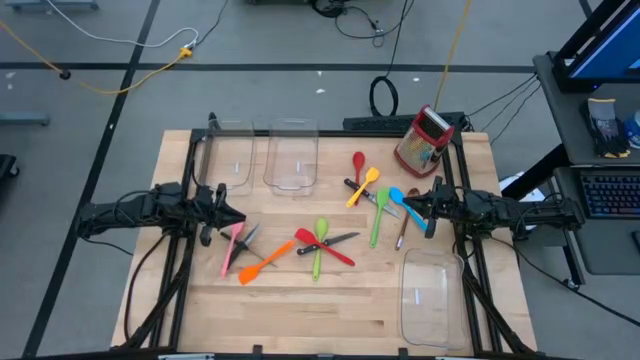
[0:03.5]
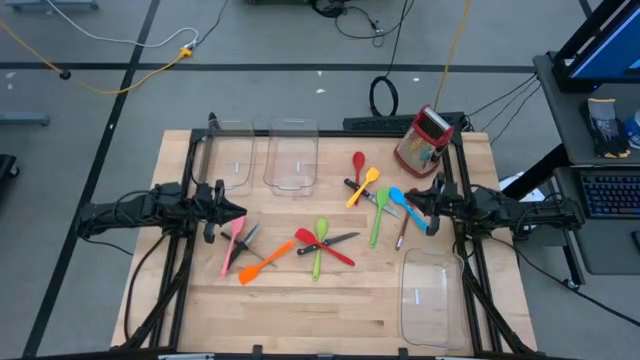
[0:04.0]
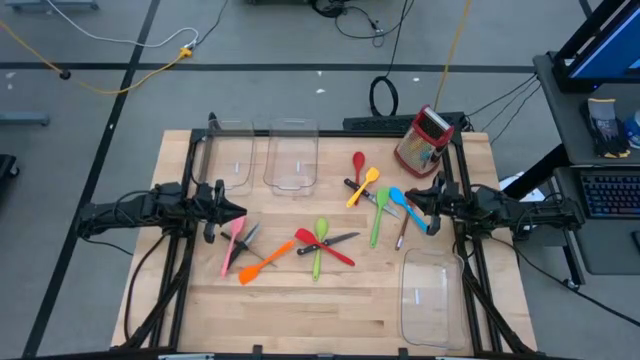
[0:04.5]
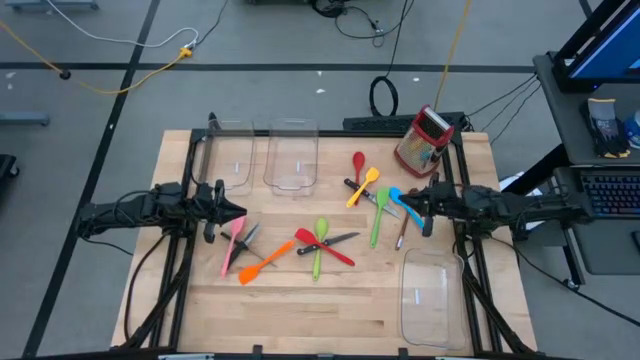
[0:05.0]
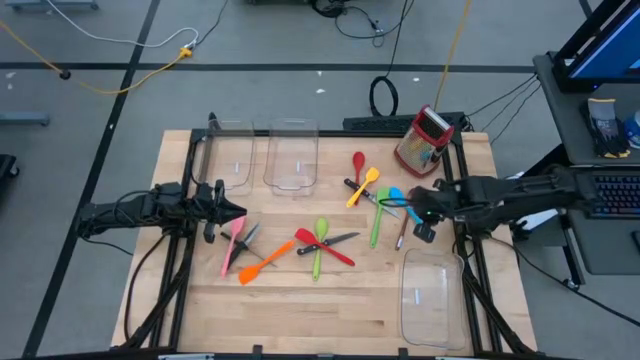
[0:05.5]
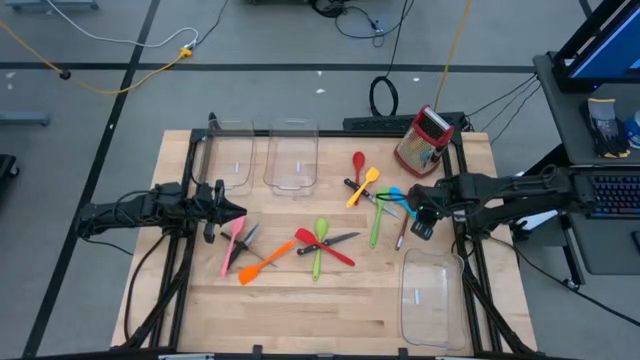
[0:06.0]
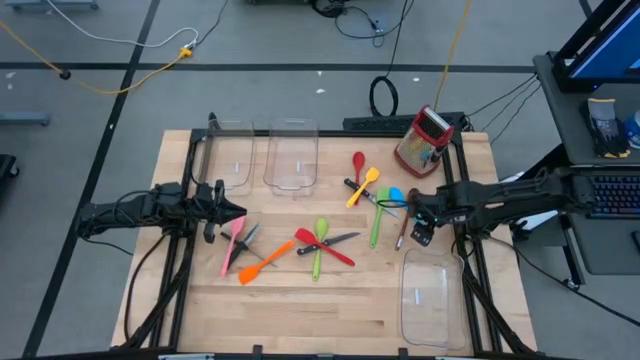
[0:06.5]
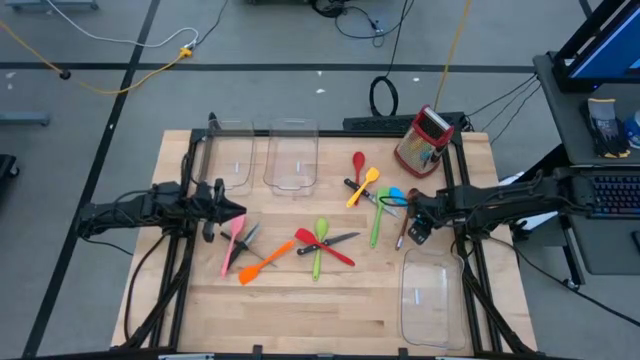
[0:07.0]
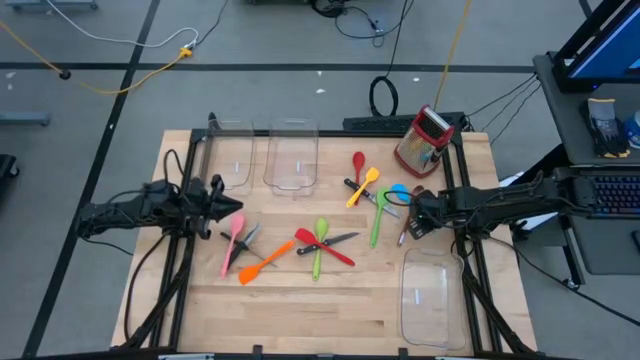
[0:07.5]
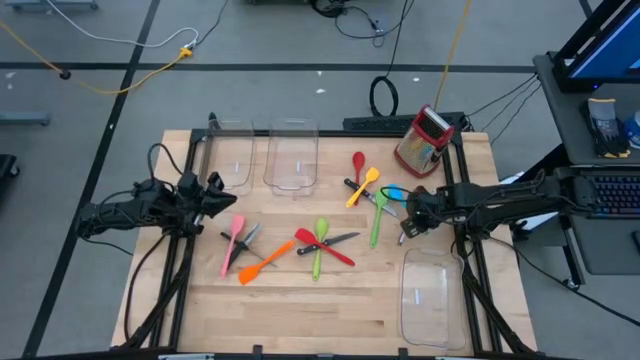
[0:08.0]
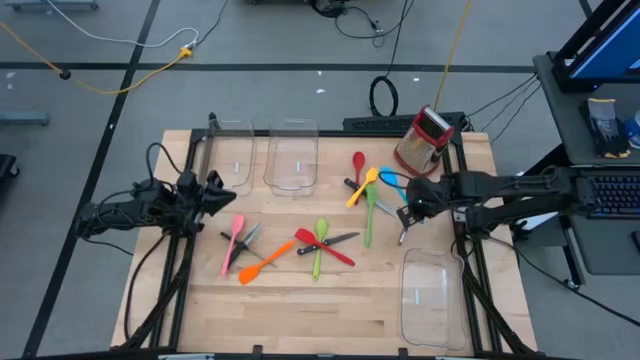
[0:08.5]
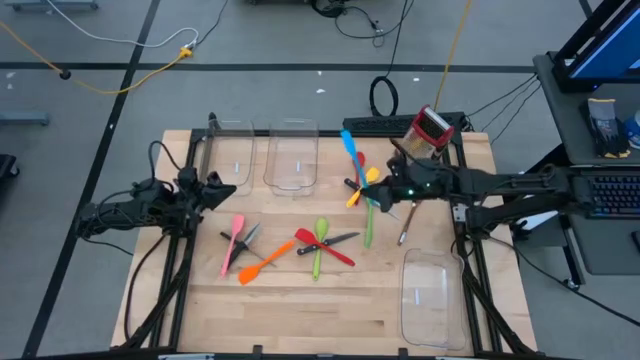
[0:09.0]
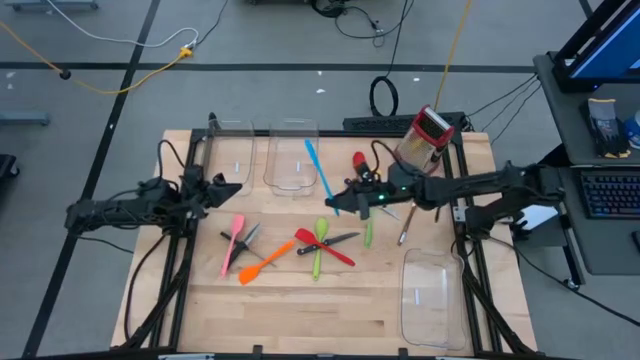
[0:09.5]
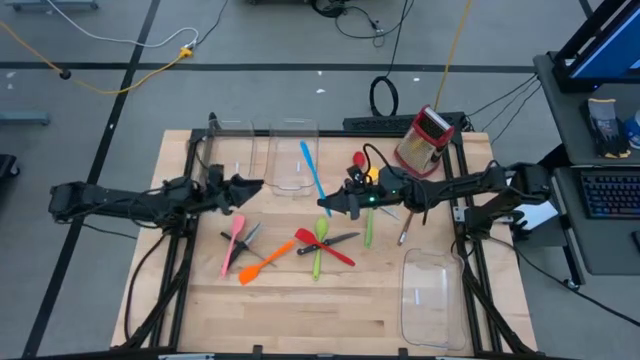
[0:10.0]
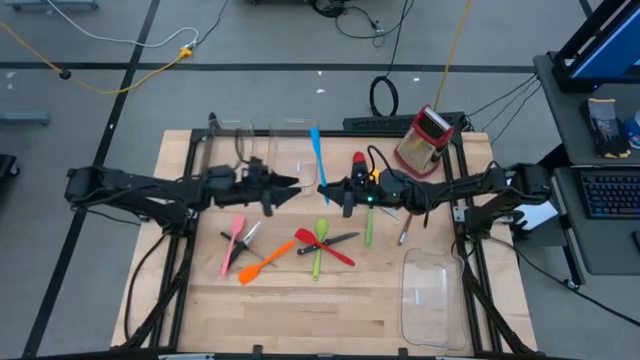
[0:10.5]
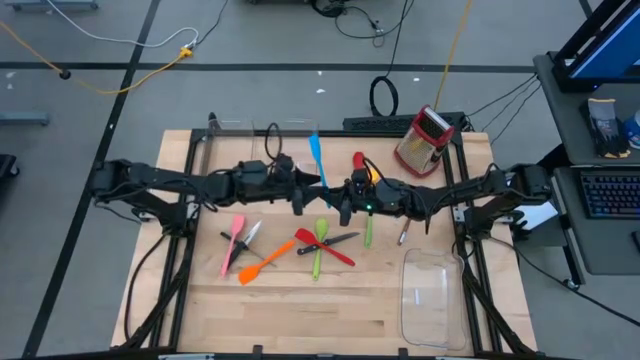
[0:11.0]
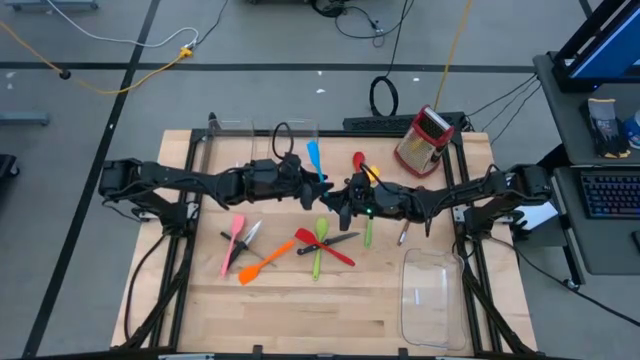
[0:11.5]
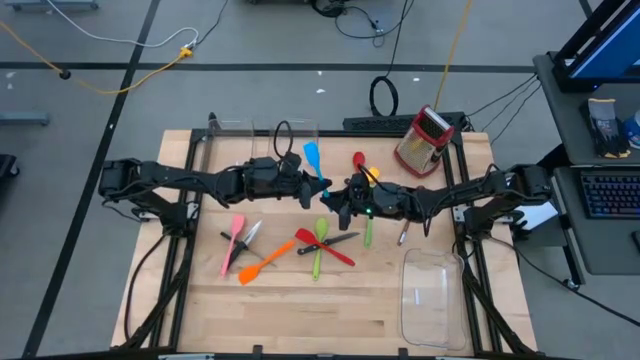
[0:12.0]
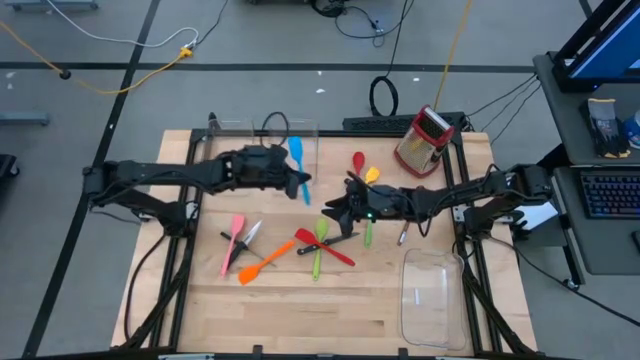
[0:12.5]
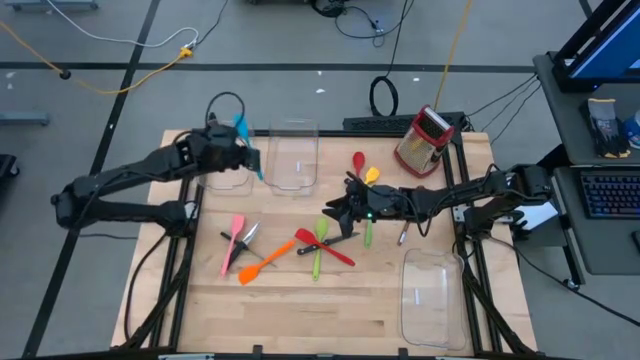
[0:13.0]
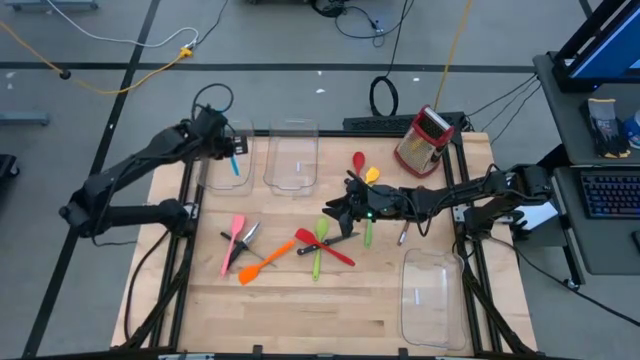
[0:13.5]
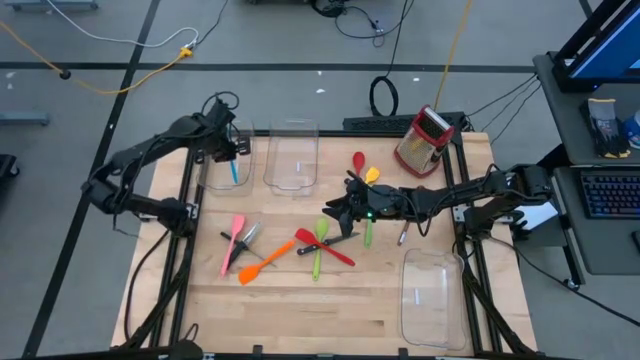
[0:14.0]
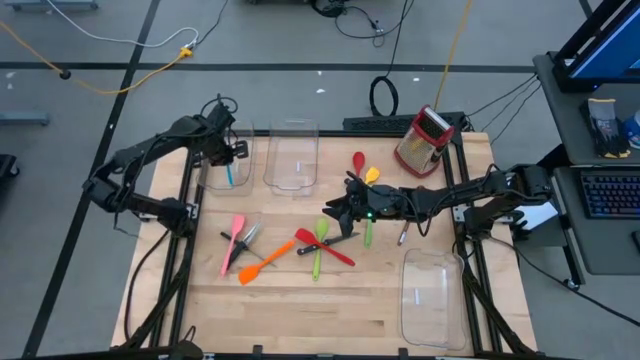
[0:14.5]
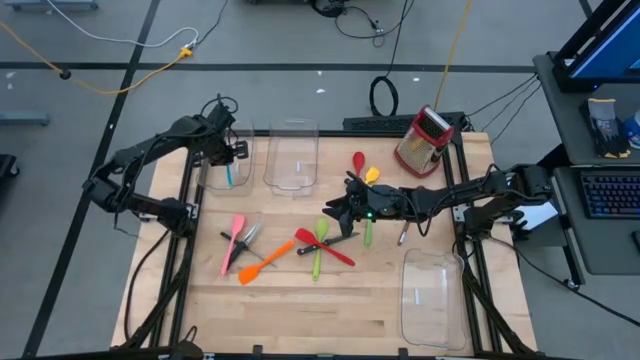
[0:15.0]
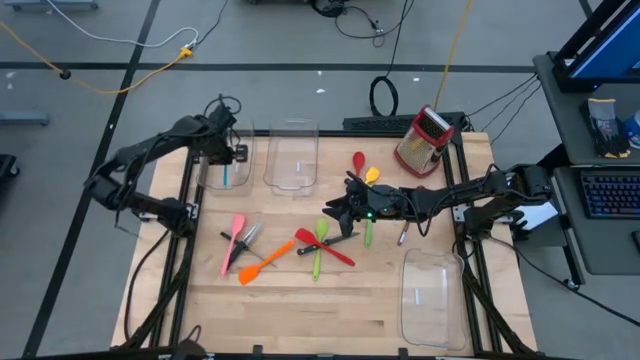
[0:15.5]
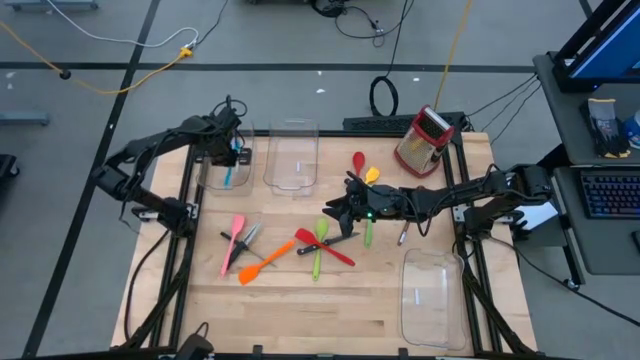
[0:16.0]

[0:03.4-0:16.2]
Task: Pick & Place Kitchen Items
Put the blue spatula into the left transparent bin

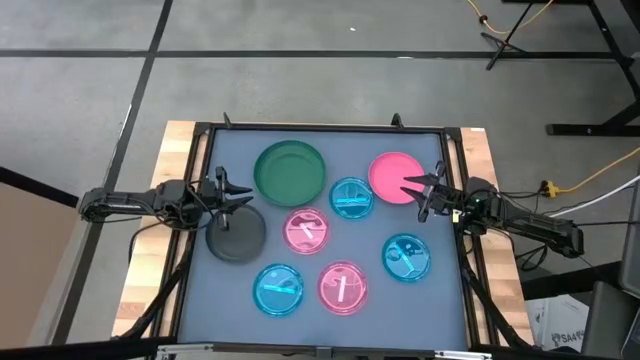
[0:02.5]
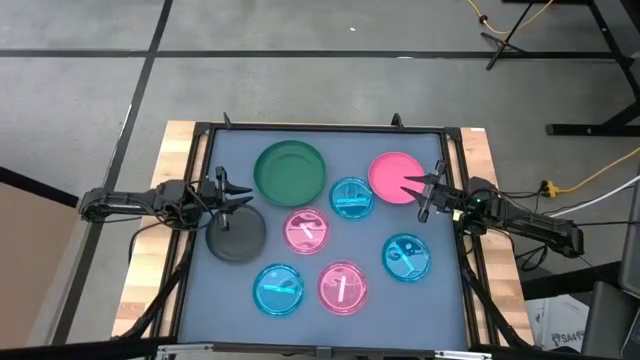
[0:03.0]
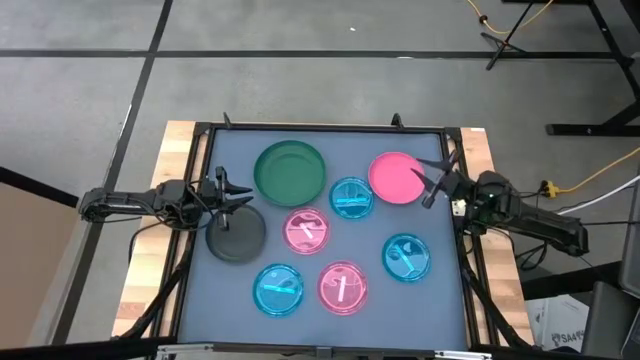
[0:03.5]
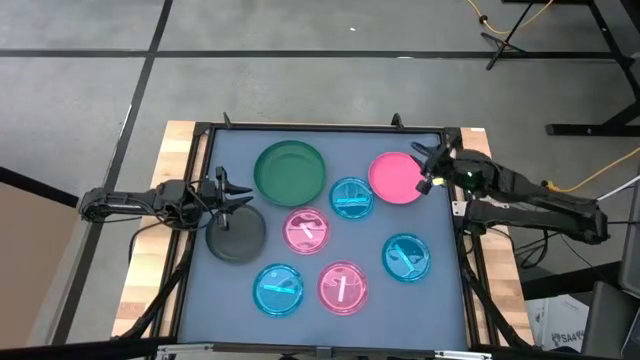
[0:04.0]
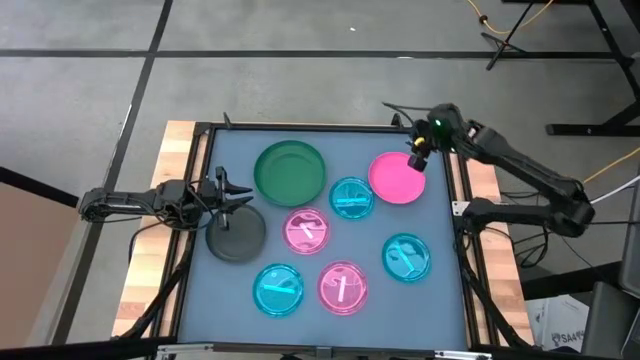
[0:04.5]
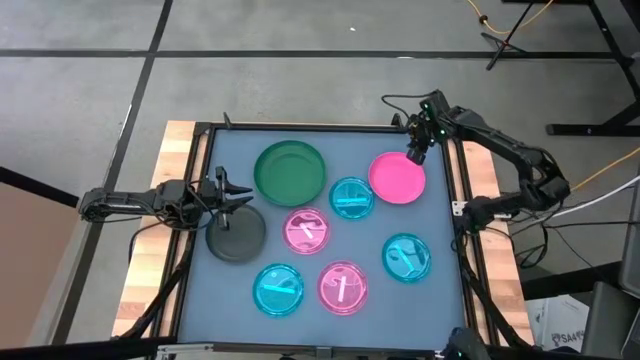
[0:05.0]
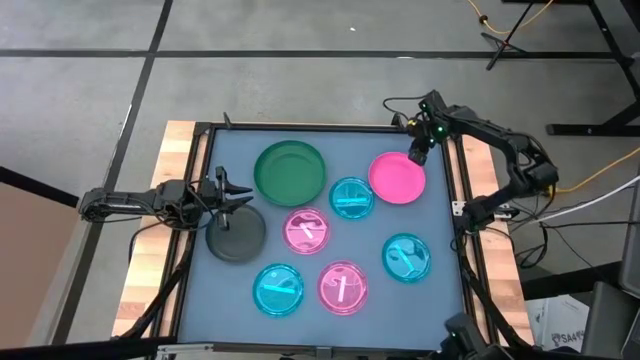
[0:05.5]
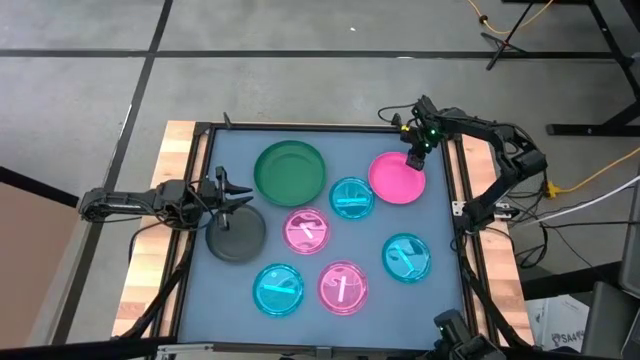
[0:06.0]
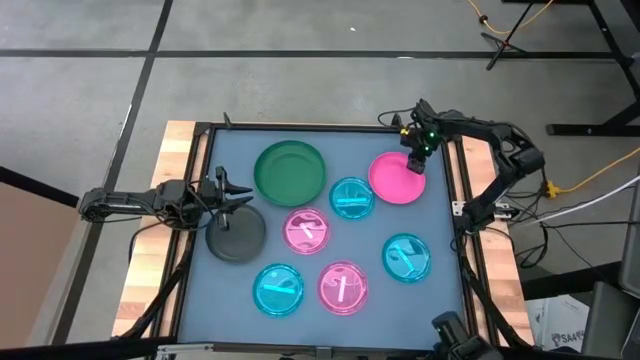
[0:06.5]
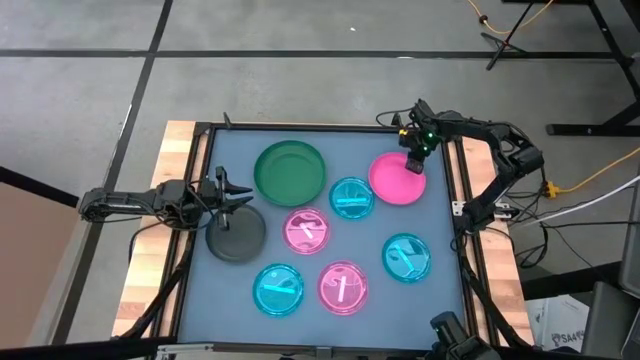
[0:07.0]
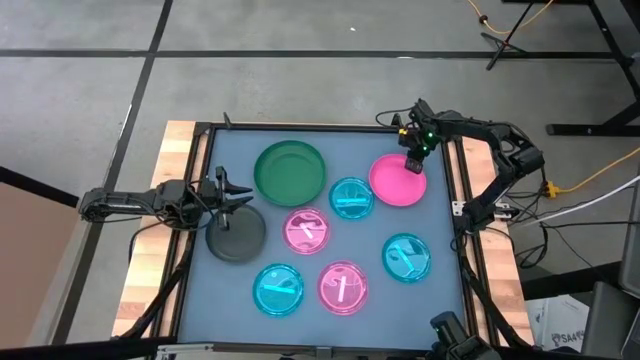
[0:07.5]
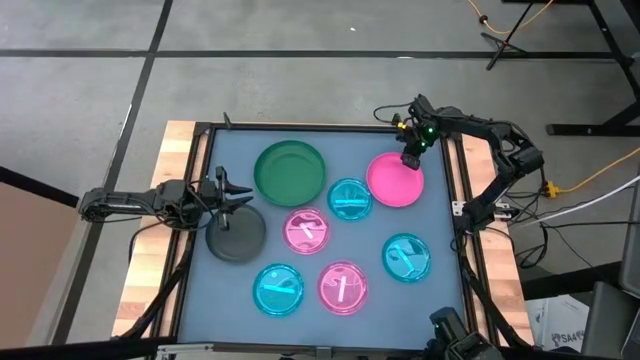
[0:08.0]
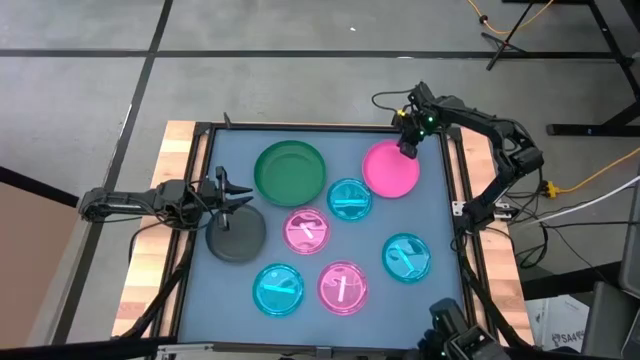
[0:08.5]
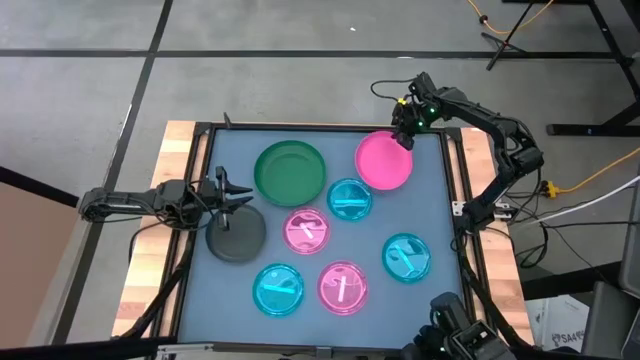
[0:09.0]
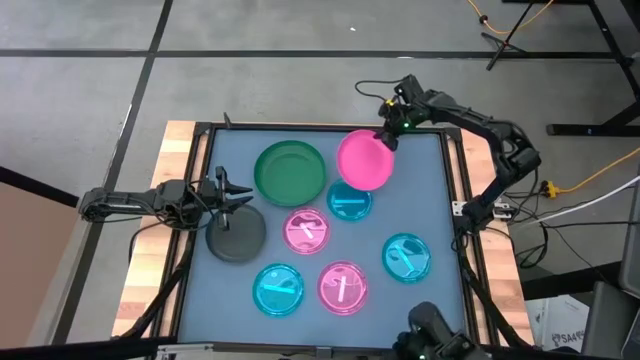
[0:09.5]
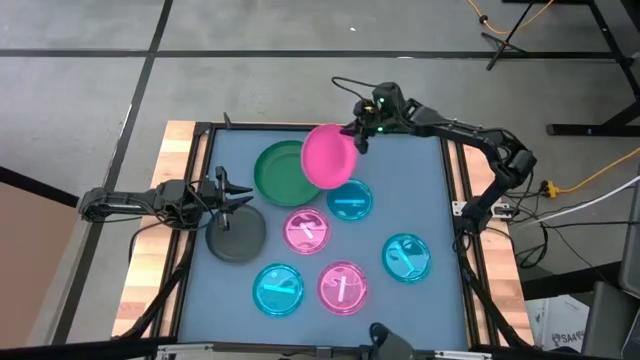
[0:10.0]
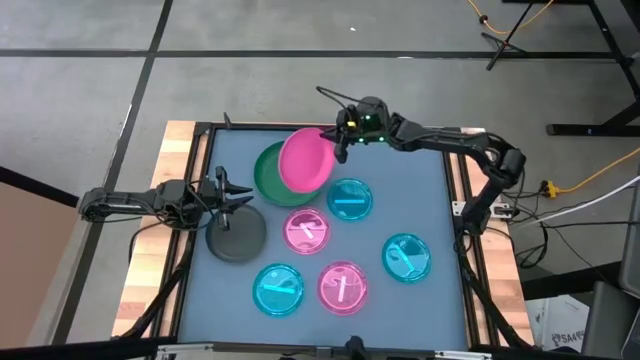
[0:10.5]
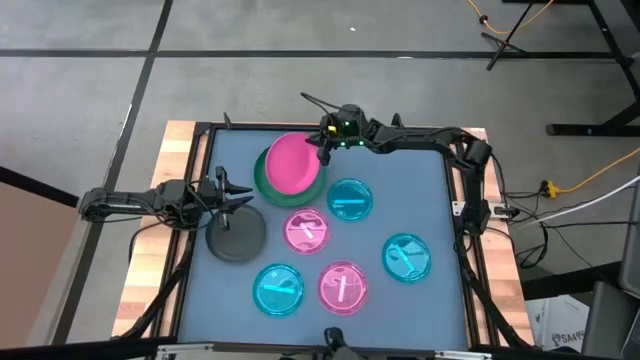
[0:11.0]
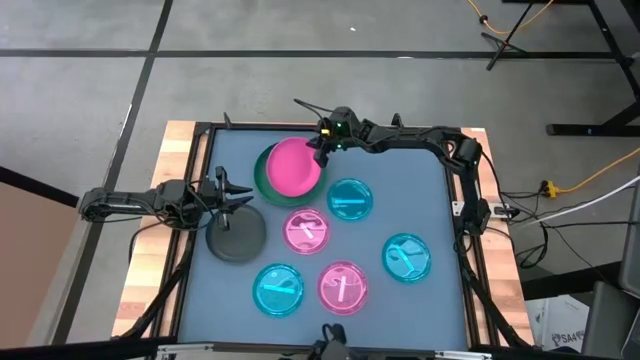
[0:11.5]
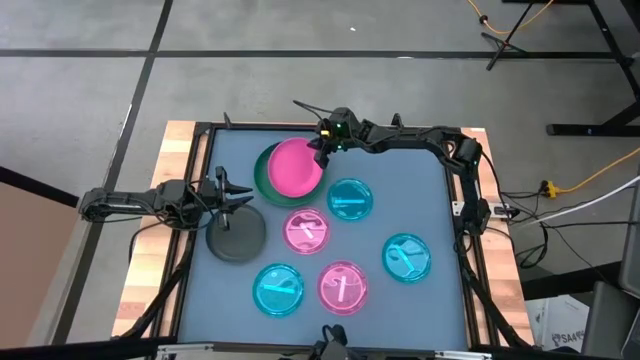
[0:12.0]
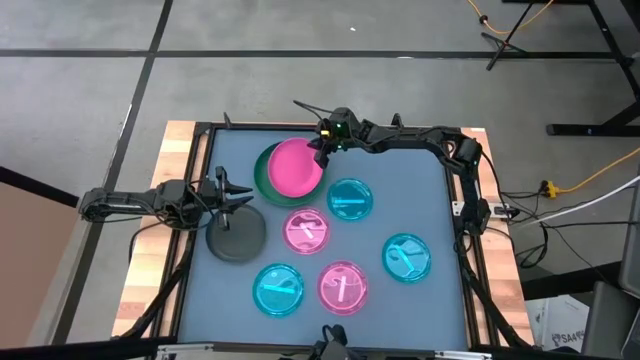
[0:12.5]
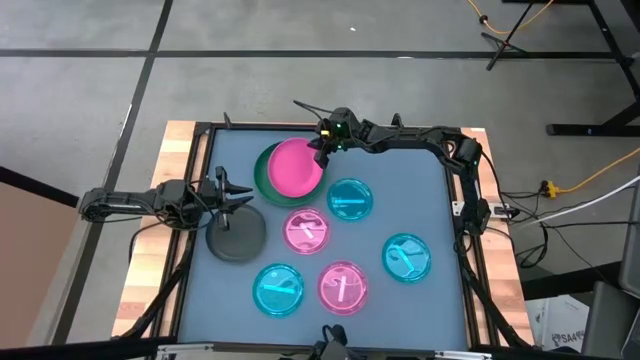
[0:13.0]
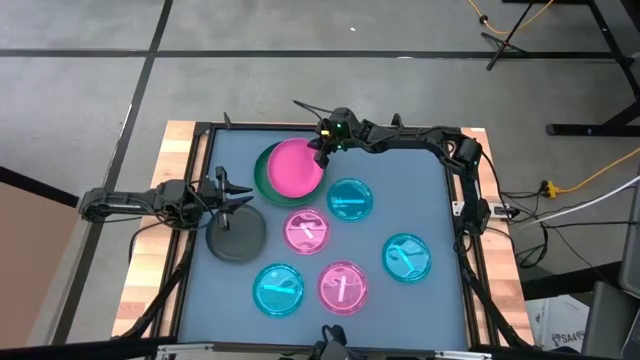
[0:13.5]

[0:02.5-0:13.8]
Task: Stack plastic plates
Stack the top right pink plate on the green plate
